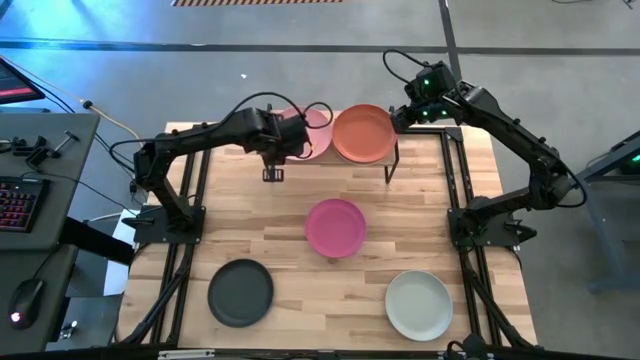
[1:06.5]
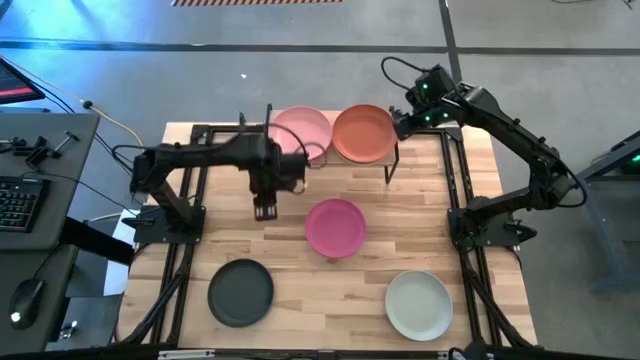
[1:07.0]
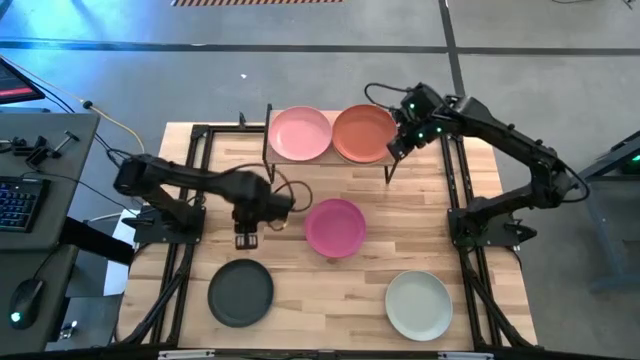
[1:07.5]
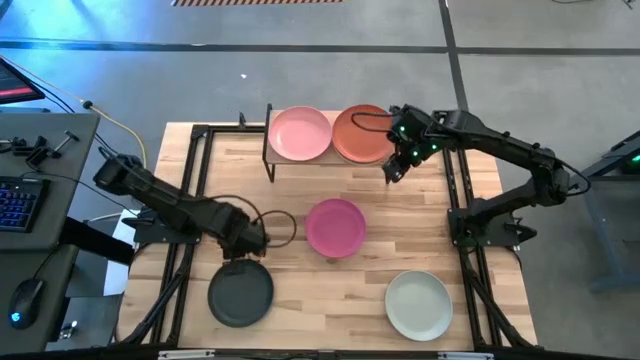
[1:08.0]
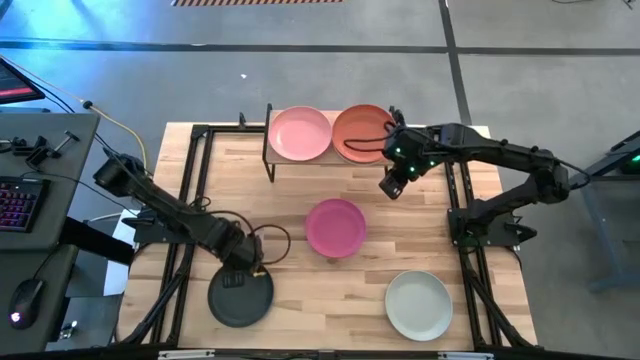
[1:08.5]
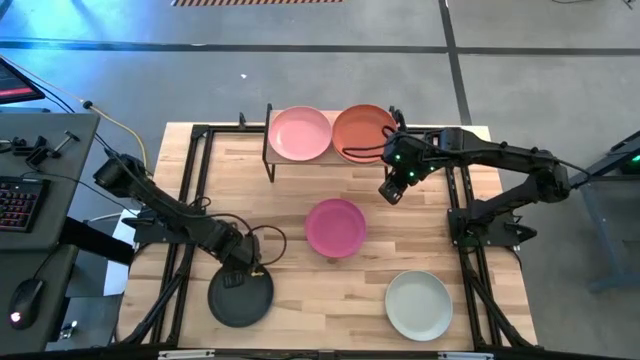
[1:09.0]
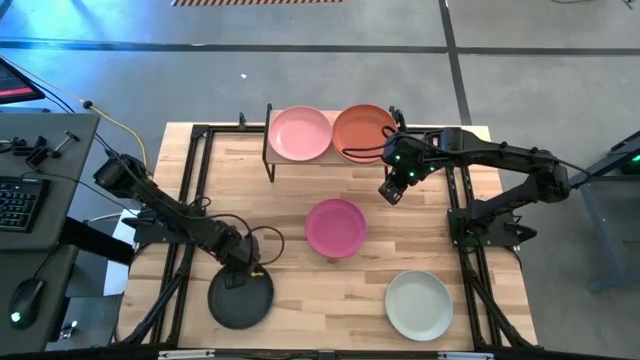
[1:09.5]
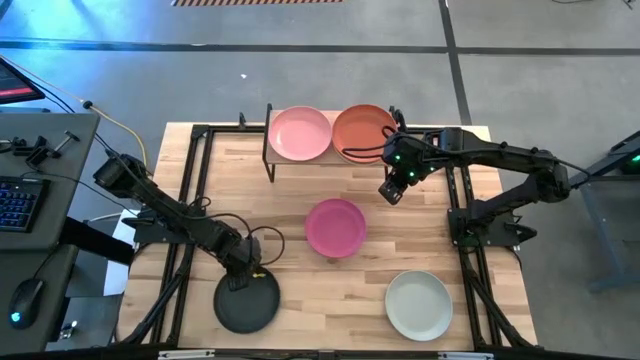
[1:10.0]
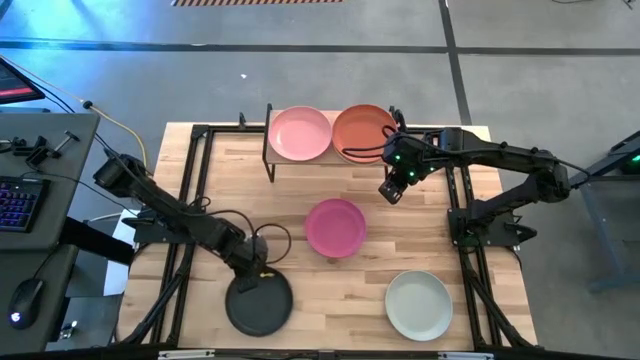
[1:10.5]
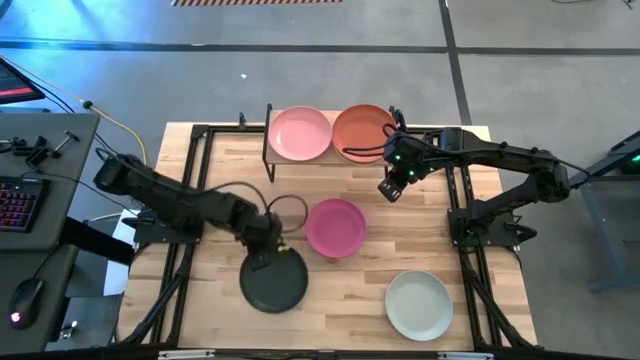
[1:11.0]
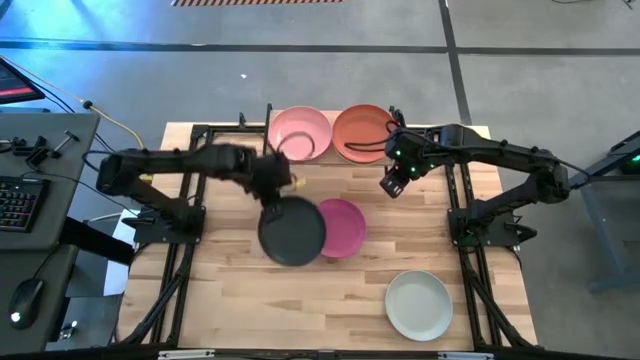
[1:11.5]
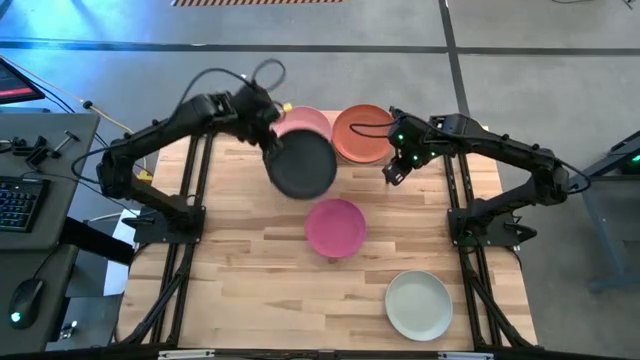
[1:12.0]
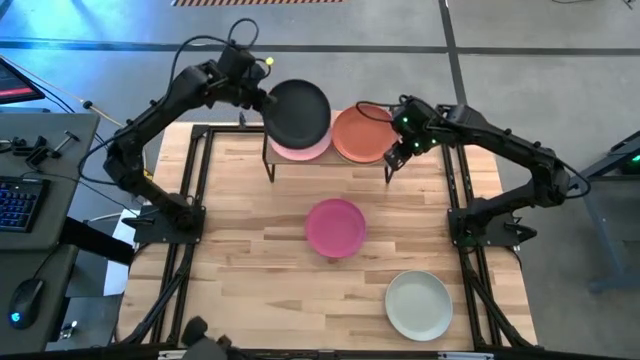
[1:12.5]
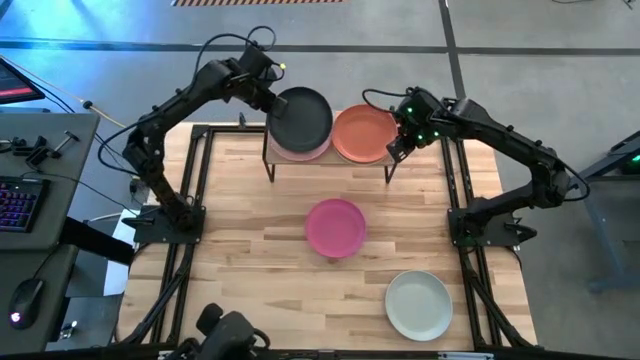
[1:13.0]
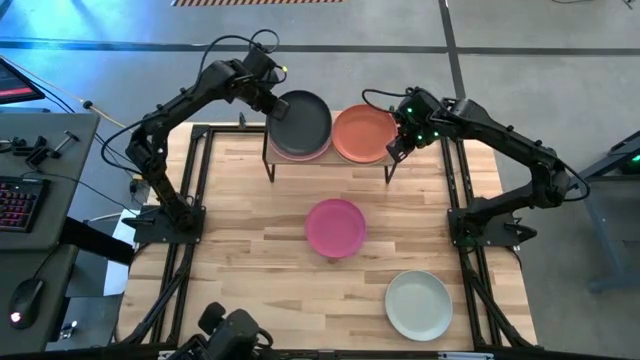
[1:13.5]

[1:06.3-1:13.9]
Task: Place and stack plates onto a shelf
Stack the black plate on top of the light pink plate on the shelf

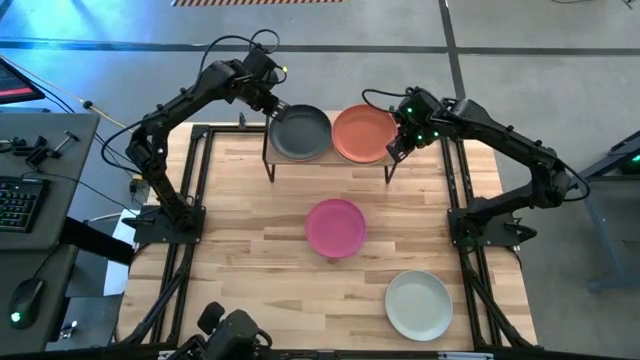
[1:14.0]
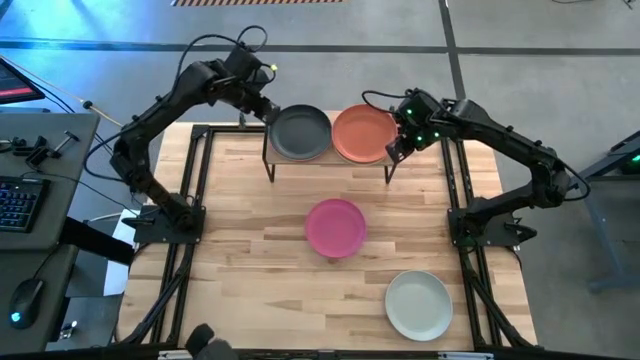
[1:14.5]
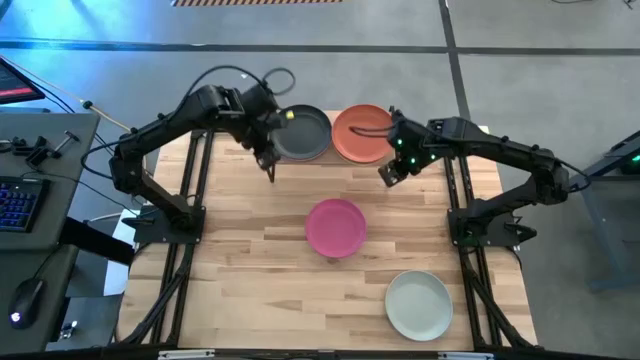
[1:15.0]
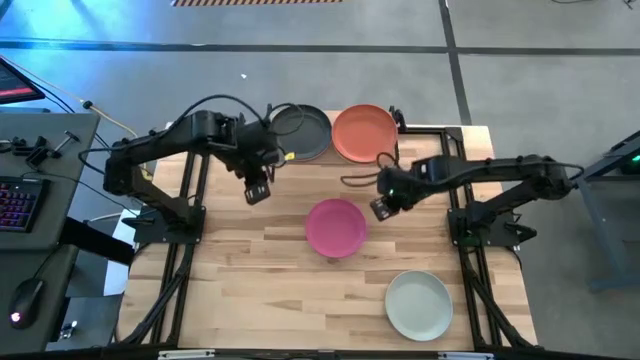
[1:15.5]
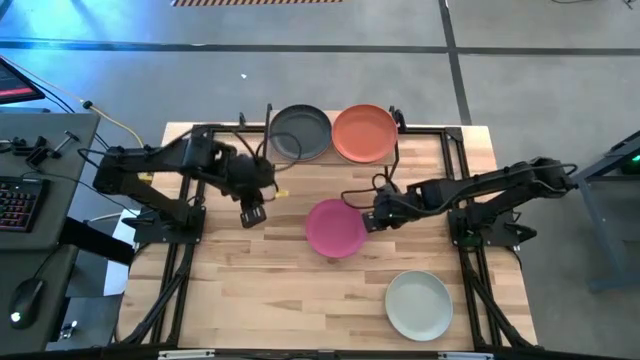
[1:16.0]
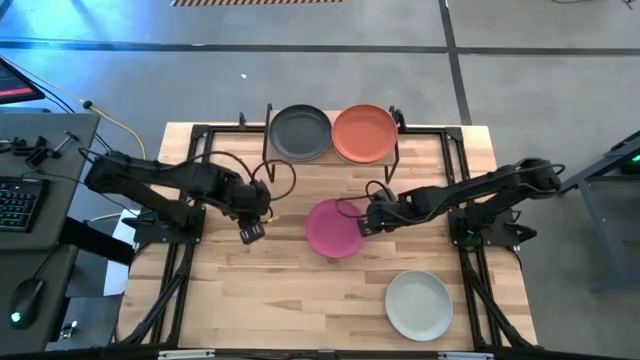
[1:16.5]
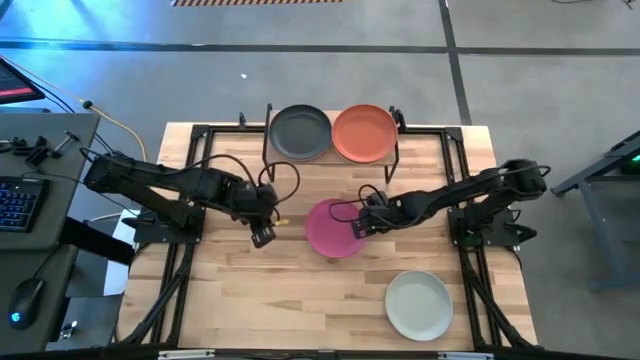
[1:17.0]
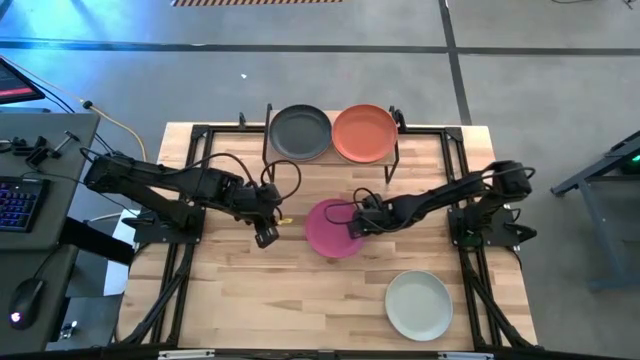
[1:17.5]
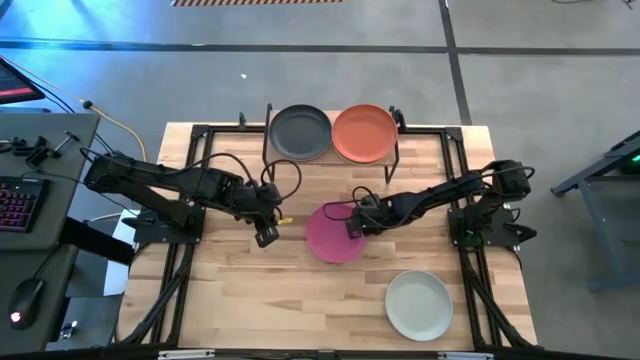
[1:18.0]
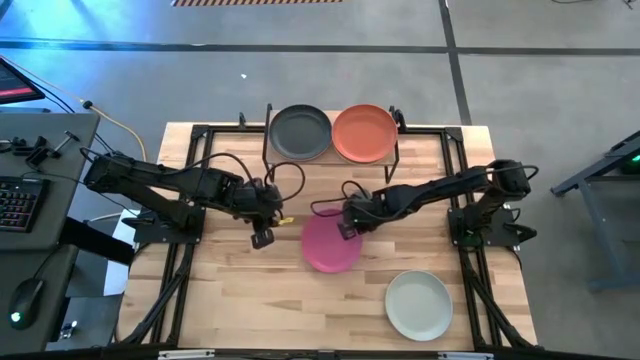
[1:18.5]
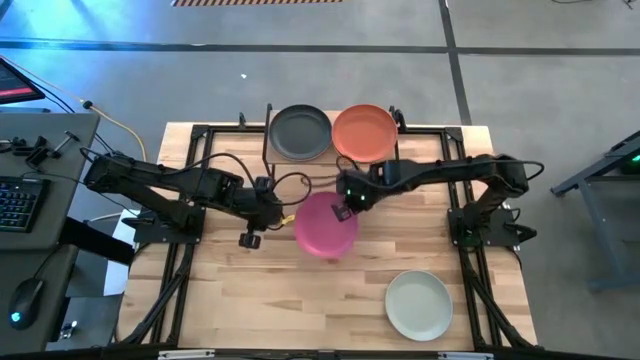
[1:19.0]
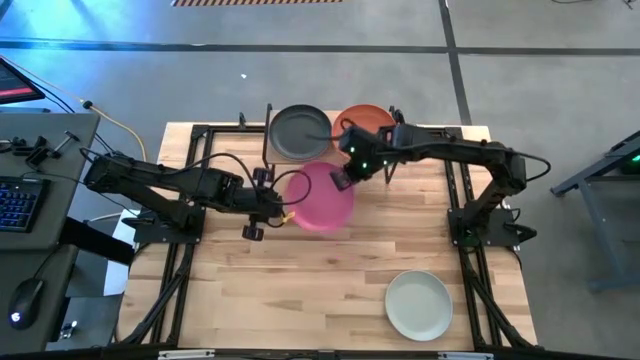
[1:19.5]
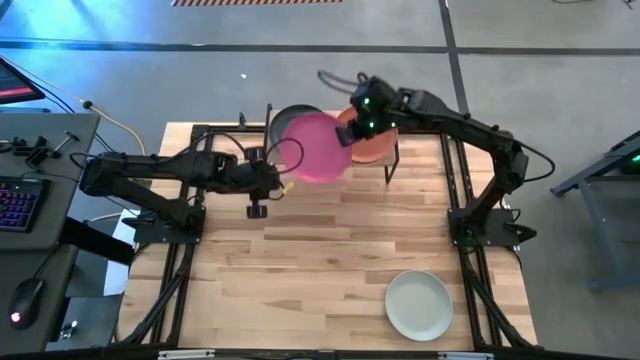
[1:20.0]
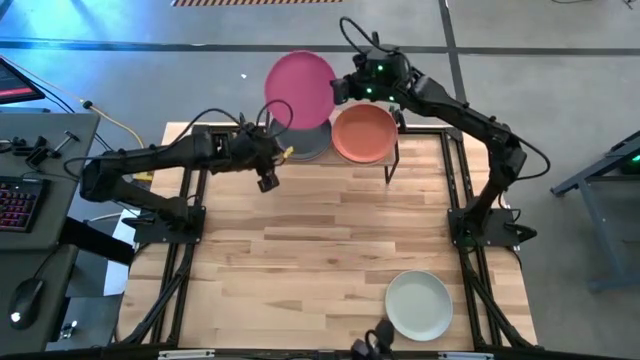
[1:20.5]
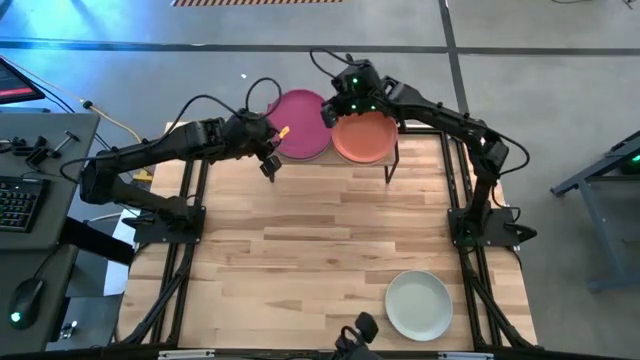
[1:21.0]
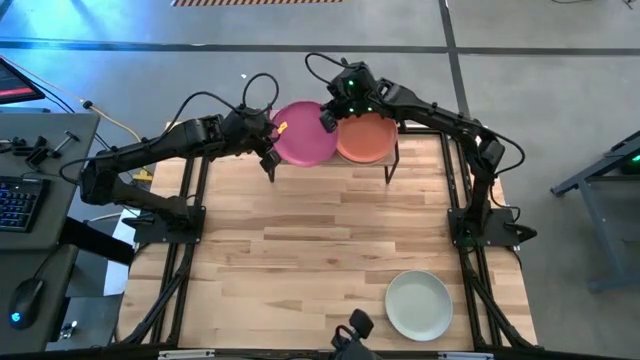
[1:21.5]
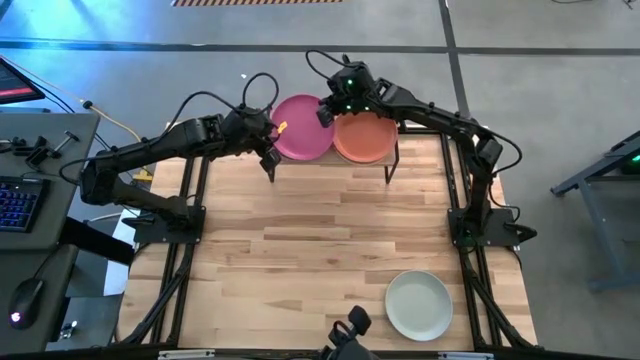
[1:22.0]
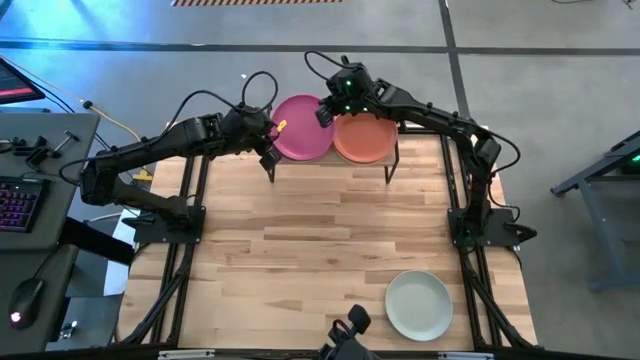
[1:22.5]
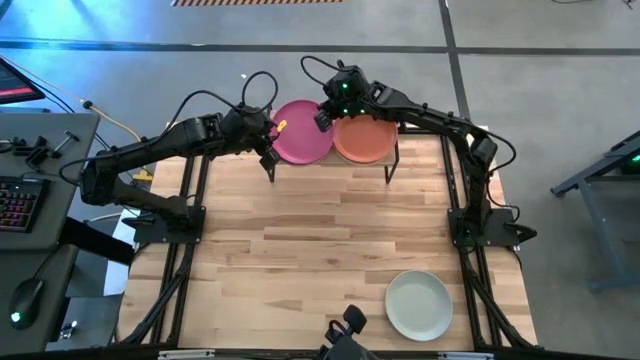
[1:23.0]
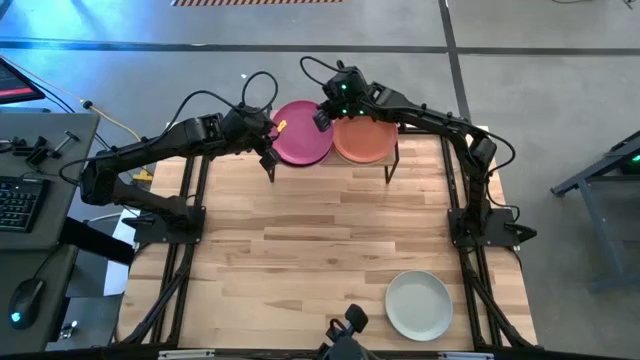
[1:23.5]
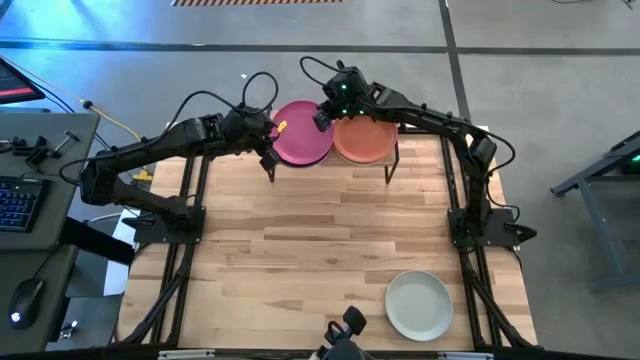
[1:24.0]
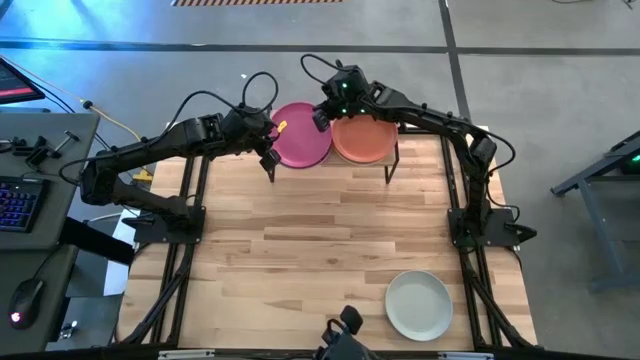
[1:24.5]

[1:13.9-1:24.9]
Stack the pink plate on top of the black plate on the shelf

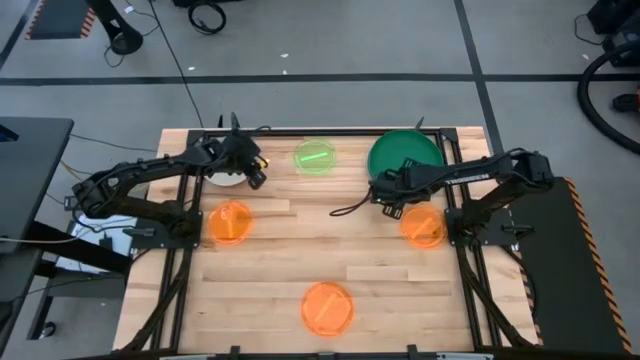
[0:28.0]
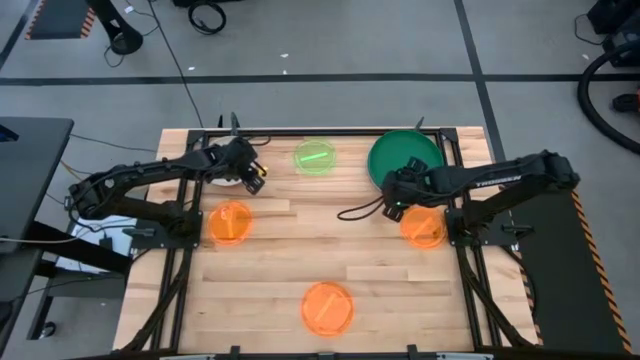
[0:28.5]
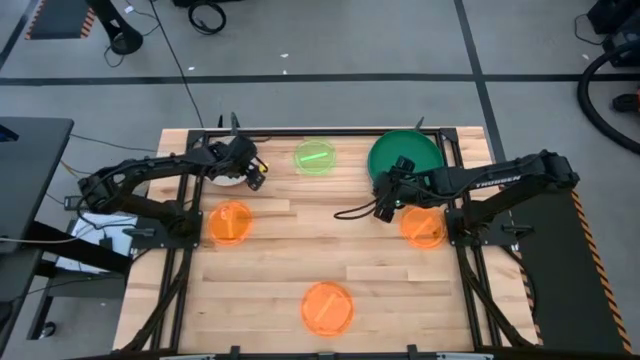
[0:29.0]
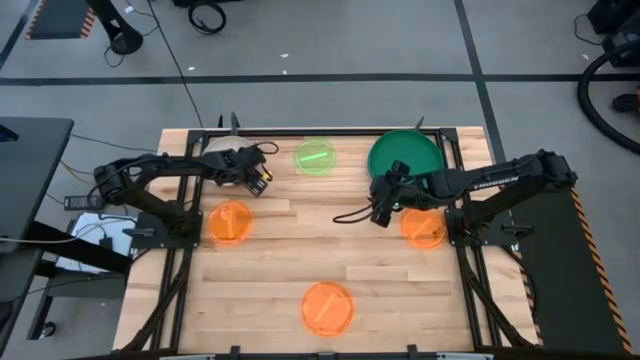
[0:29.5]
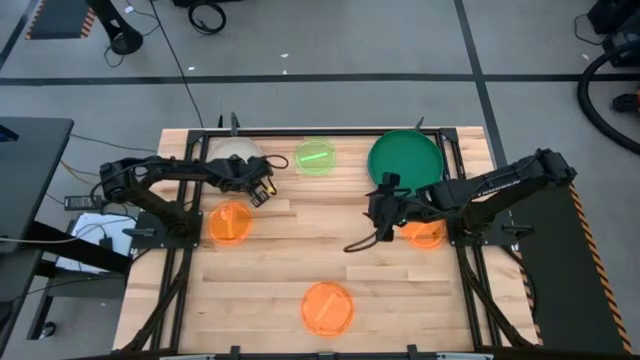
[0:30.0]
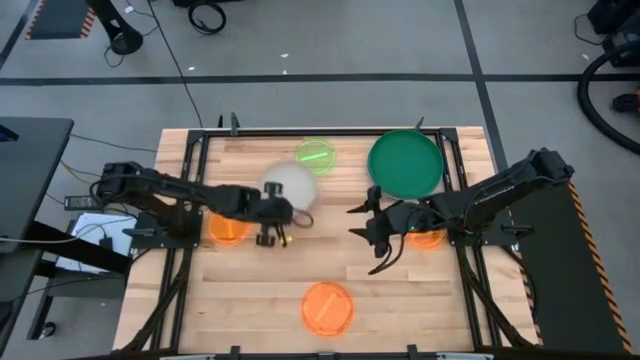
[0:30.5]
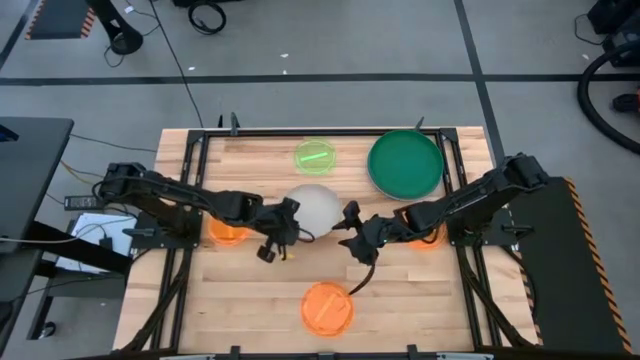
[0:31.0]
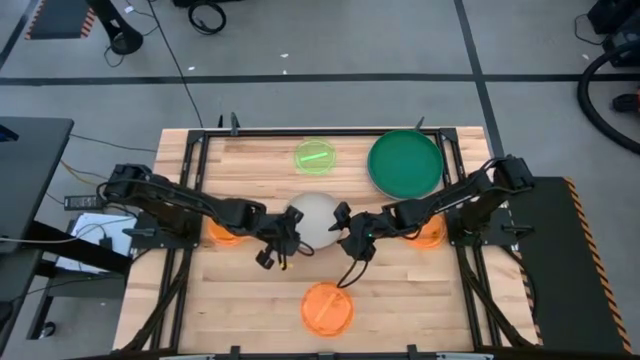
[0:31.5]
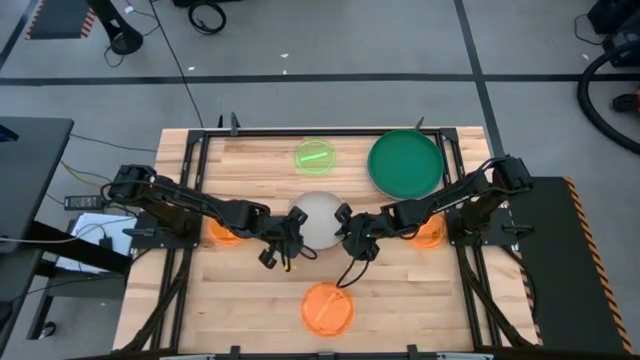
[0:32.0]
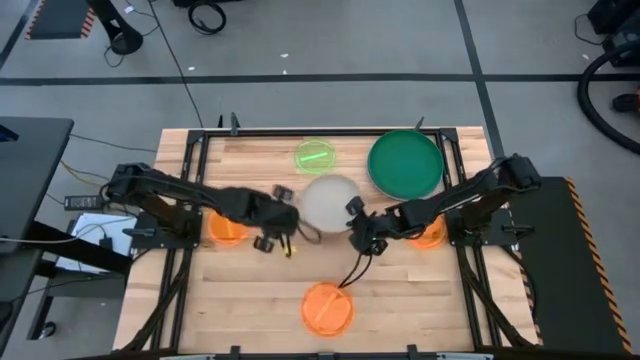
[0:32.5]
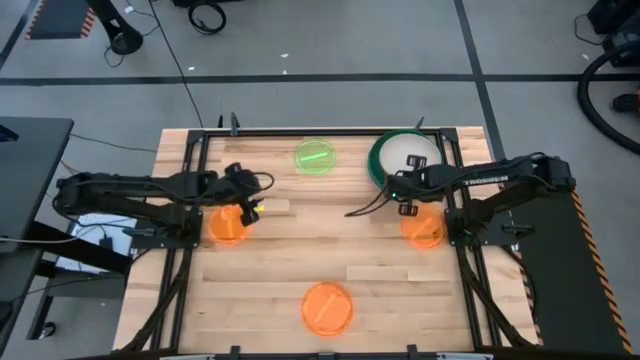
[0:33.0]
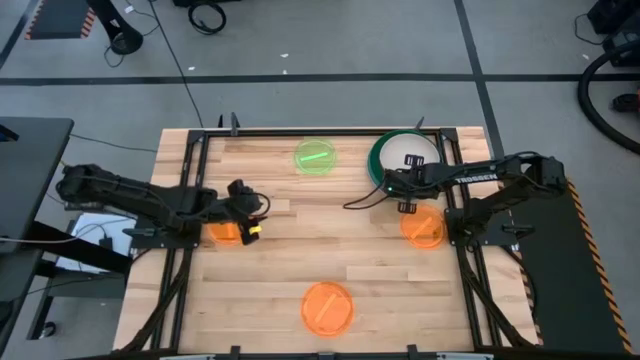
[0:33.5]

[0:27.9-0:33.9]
Task: Stack plastic plates
Stack the left stacked plates on top of the green plate
